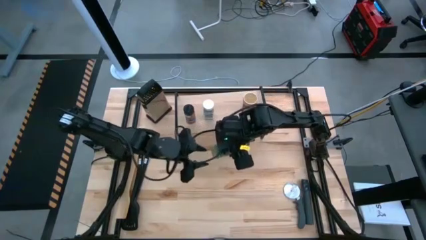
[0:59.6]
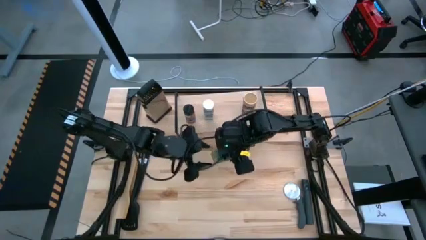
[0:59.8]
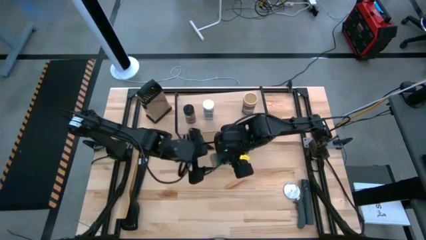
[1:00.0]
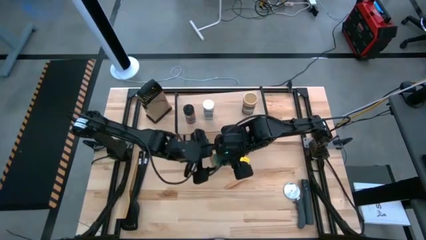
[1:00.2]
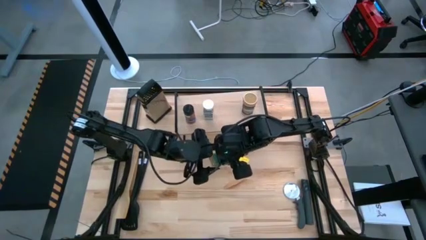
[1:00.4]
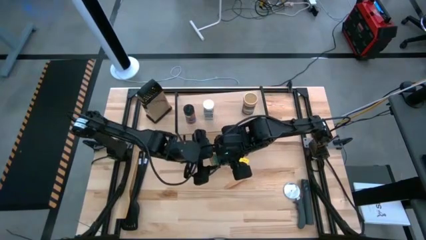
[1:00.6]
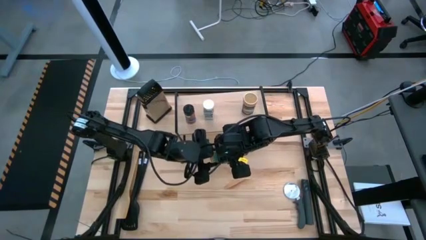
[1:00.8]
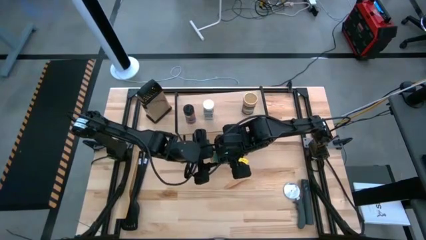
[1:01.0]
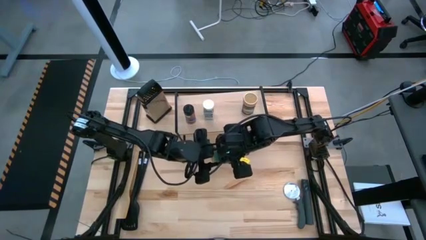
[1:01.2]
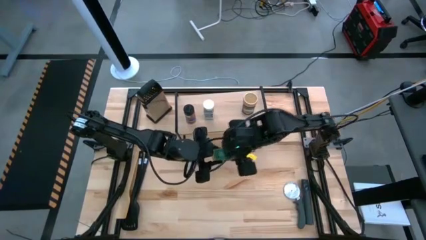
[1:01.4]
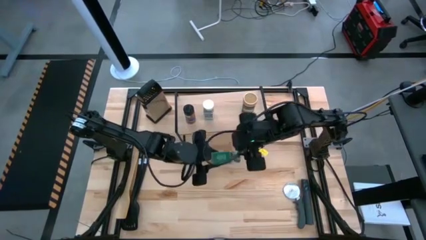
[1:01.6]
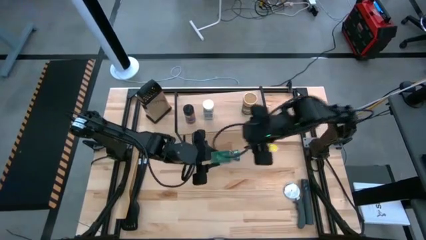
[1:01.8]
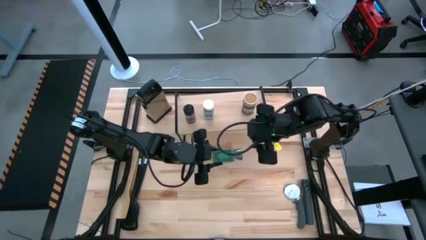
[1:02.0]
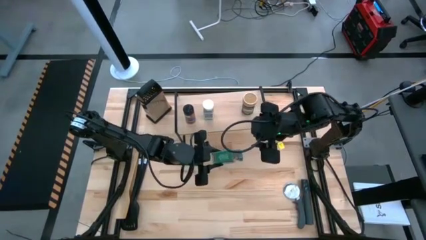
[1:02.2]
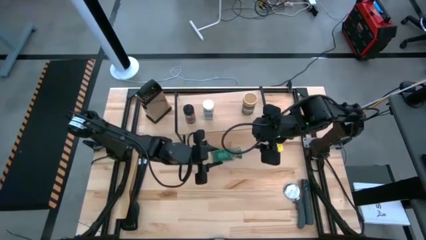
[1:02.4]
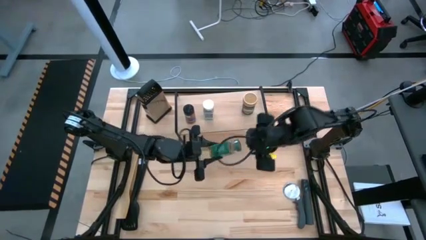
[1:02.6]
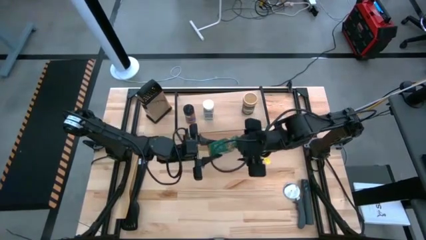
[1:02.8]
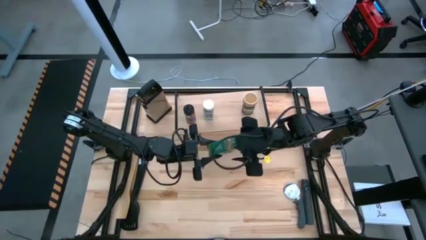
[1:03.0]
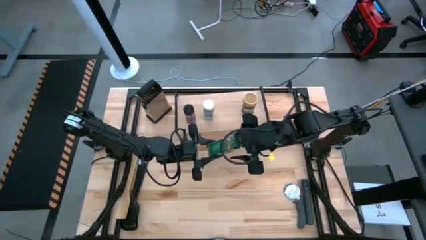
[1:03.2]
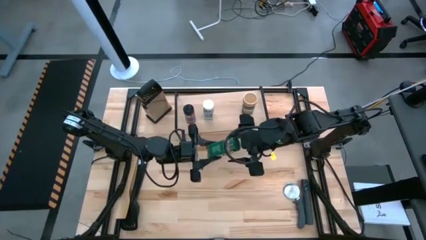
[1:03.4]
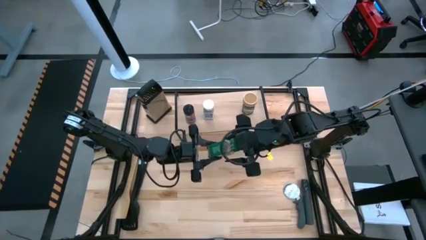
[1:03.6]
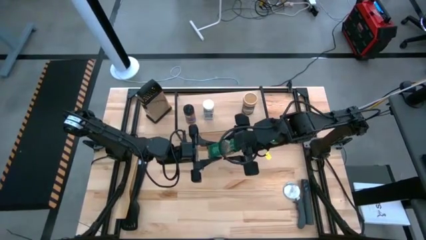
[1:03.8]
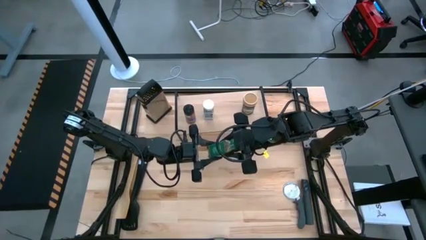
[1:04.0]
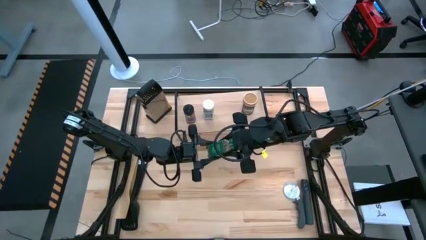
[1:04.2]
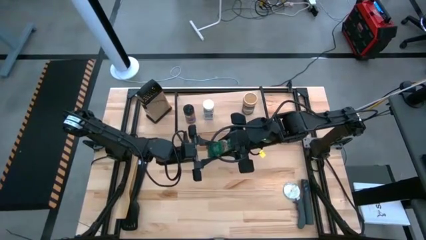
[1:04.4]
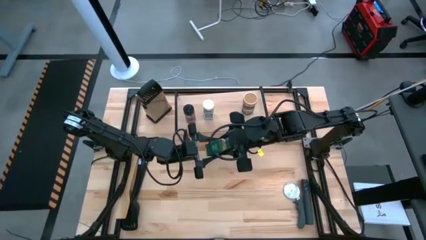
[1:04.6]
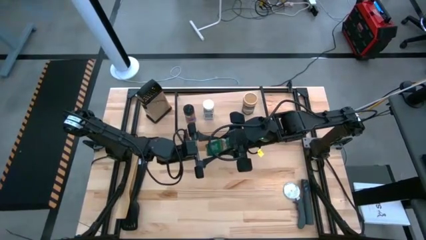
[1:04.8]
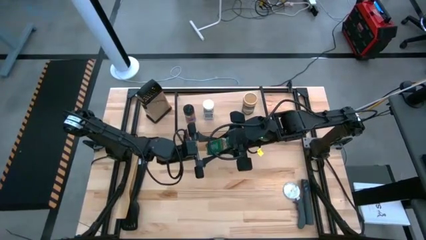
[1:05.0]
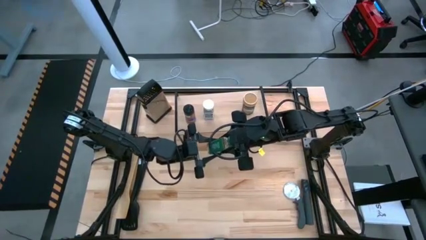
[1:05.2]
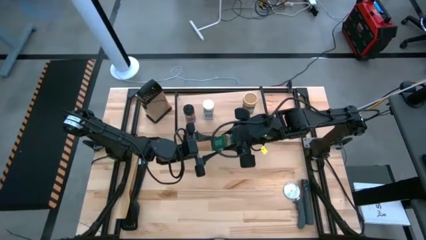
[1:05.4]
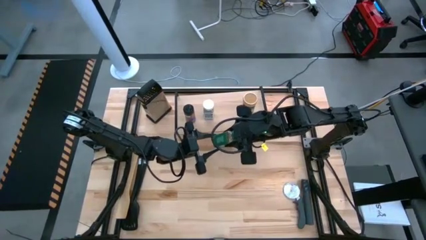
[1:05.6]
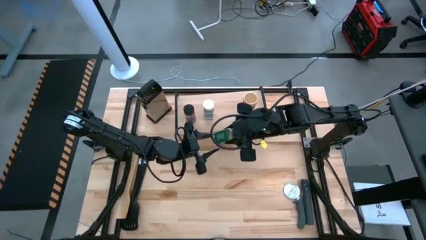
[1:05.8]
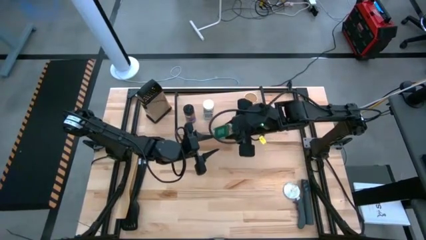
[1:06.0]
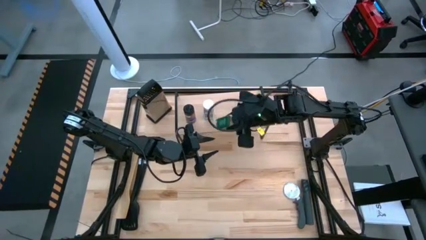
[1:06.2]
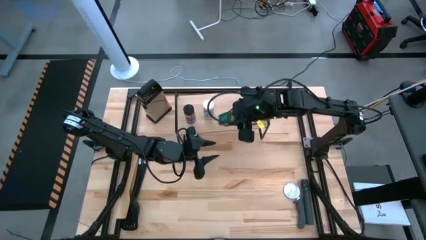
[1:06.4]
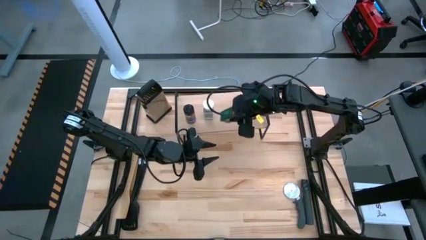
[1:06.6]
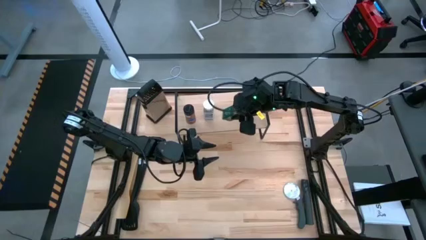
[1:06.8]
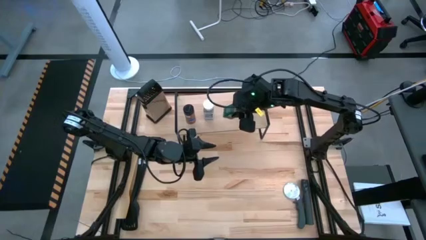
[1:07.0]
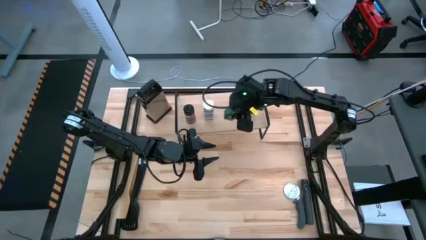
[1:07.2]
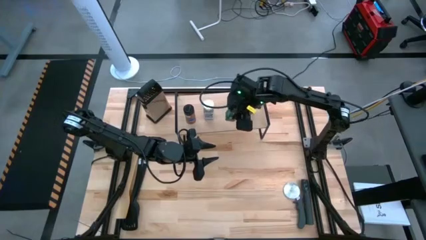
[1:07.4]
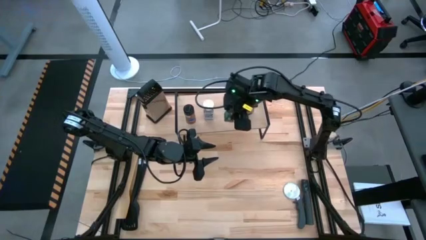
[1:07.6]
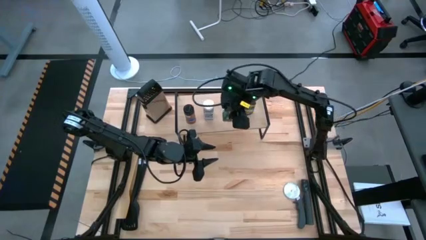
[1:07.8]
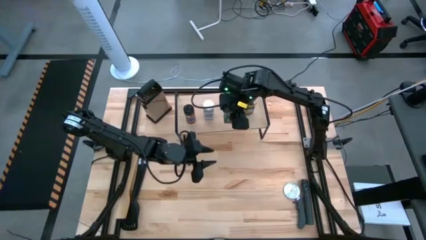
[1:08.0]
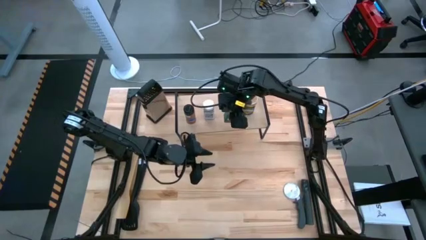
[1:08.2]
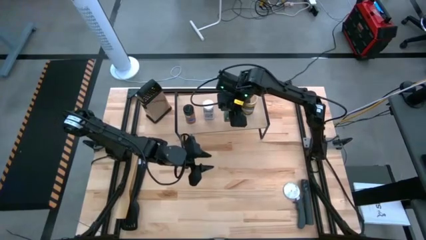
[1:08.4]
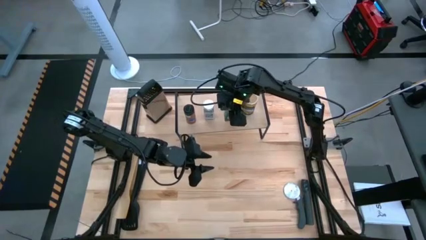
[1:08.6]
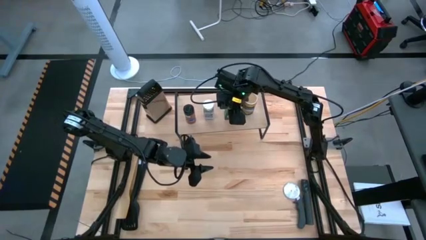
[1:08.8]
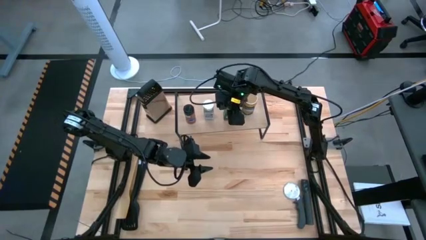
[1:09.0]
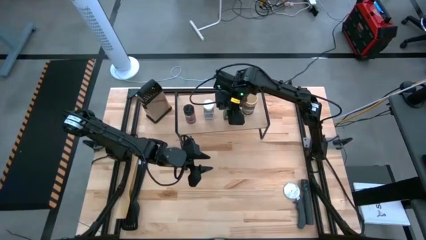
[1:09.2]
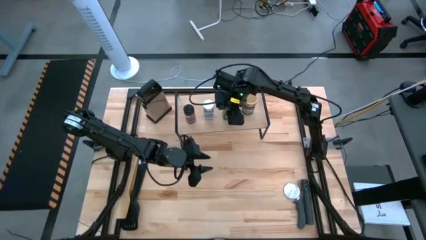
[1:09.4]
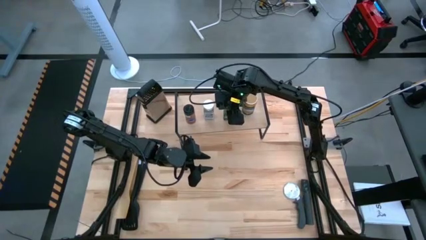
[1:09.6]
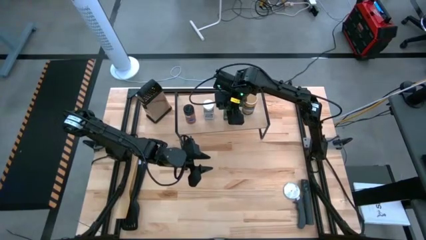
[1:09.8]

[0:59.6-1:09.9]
Task: Shelf spices
Put the green seasoning bottle on the shelf

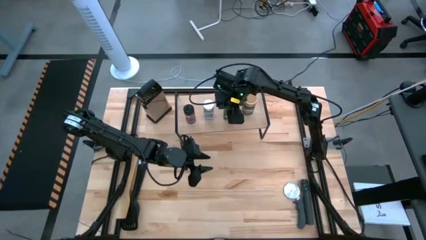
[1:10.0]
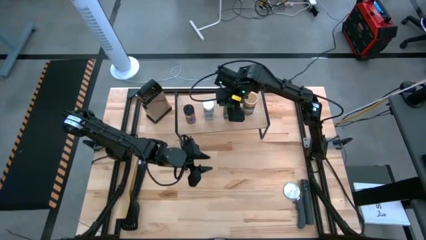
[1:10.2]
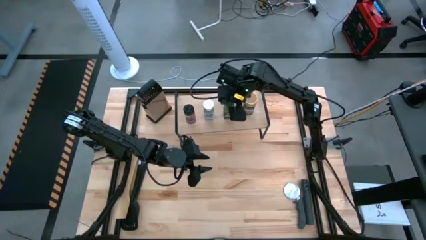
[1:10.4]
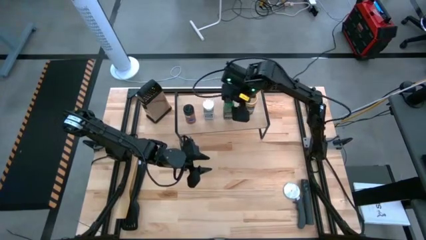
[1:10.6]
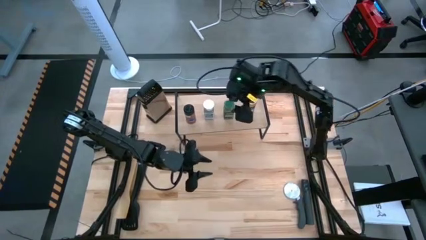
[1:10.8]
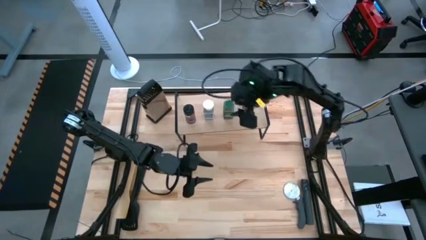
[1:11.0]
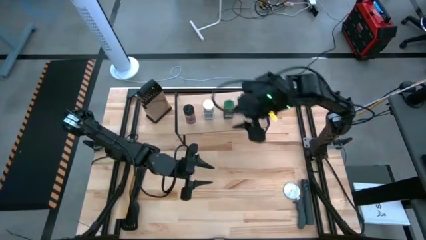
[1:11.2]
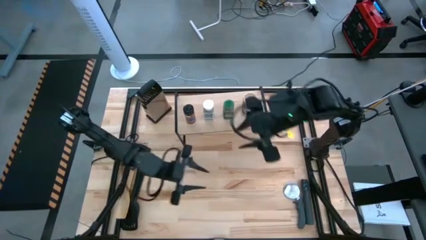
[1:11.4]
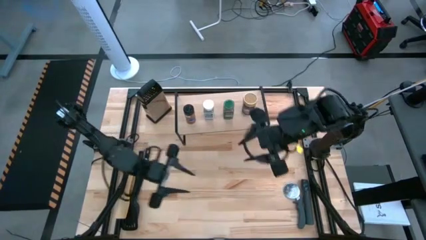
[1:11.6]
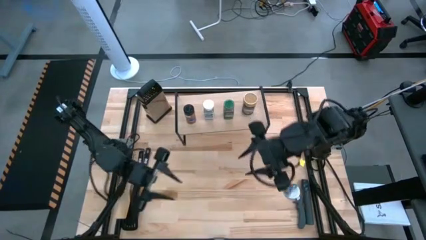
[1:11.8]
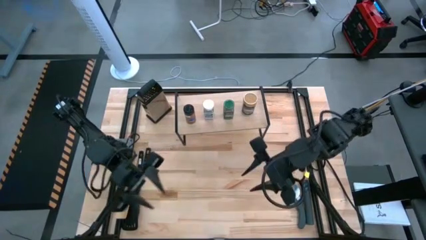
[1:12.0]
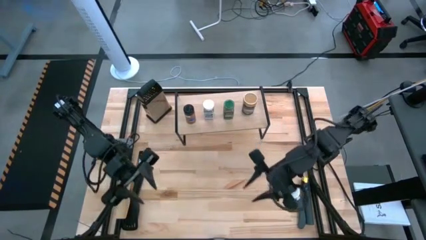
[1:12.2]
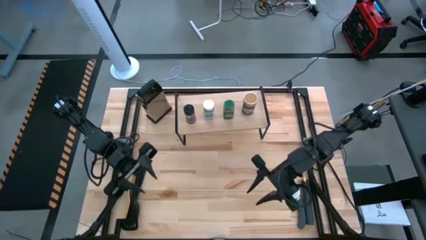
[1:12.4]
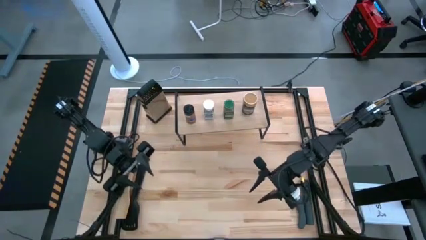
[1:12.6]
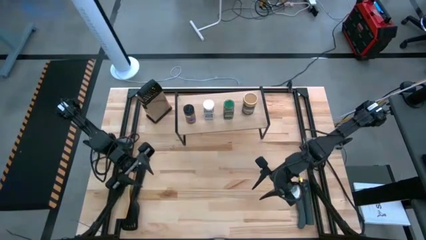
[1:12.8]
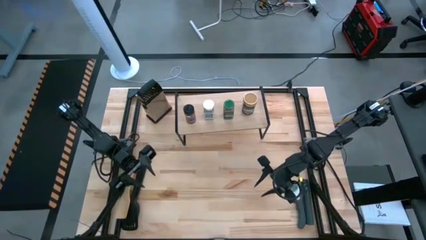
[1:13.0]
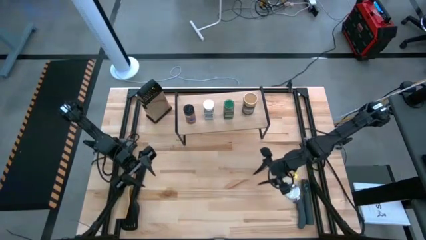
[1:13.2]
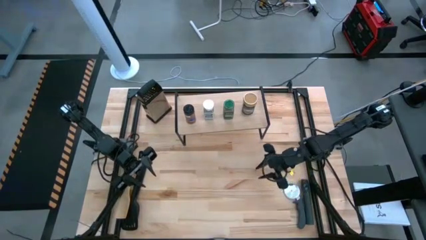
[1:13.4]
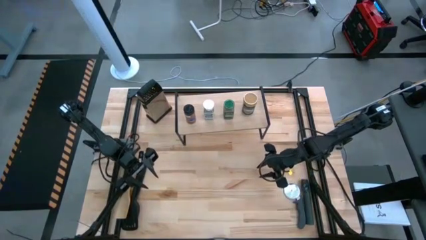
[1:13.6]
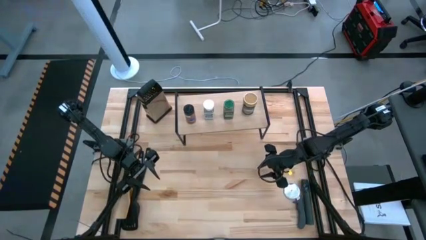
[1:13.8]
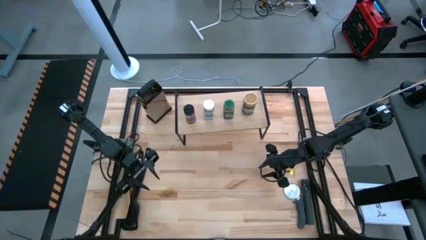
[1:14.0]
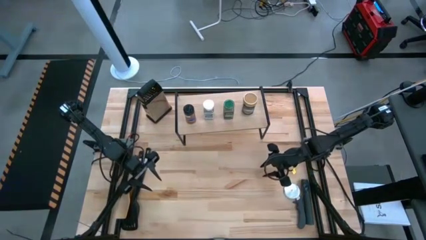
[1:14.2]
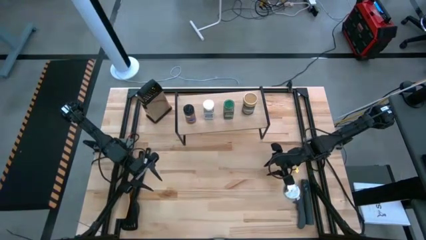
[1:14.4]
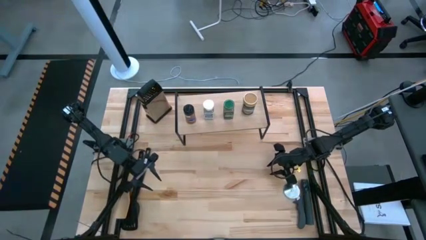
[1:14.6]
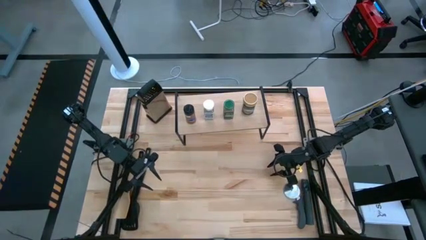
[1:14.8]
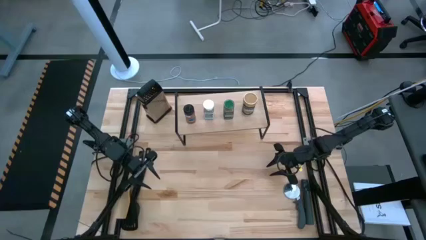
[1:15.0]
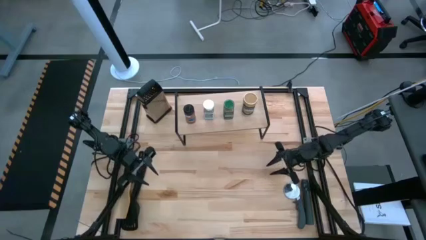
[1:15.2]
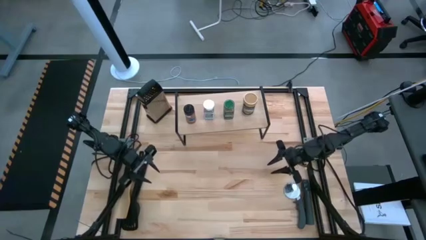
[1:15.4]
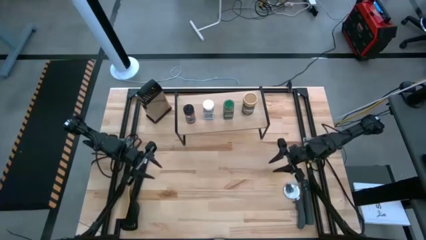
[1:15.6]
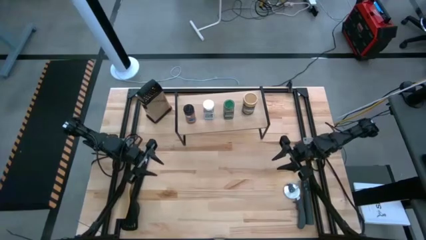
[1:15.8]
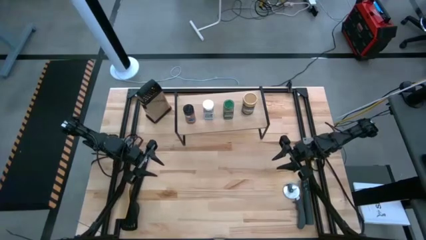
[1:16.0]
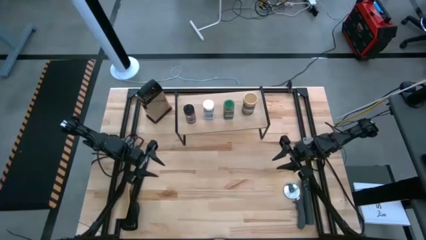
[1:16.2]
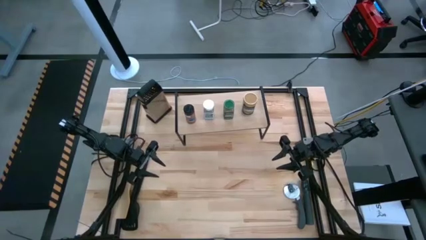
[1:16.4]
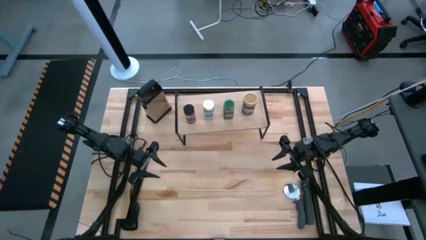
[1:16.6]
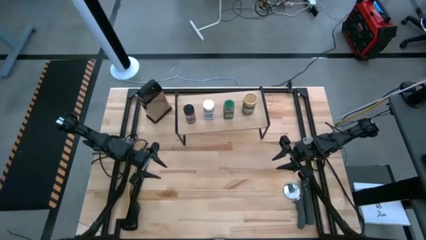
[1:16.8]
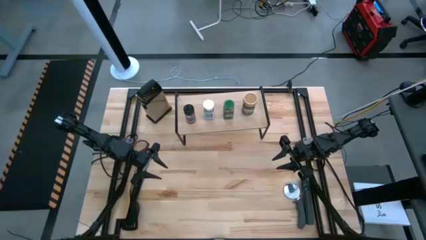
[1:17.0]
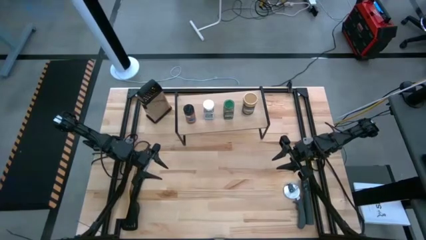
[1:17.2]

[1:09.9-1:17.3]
Return to Home Position
